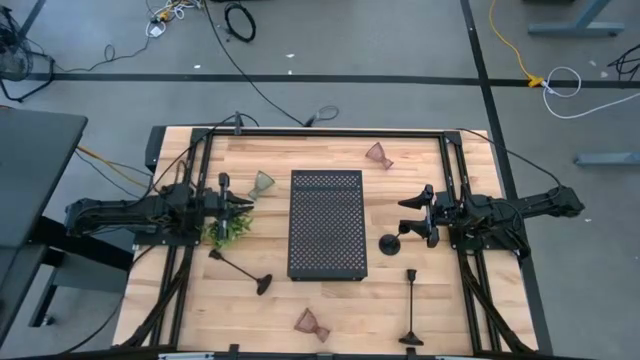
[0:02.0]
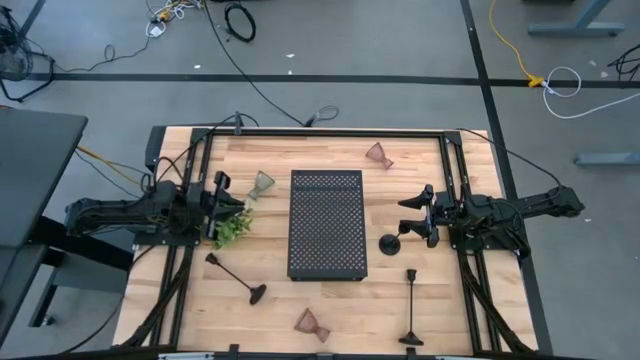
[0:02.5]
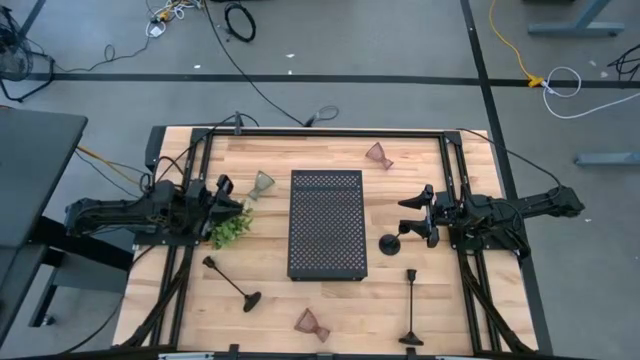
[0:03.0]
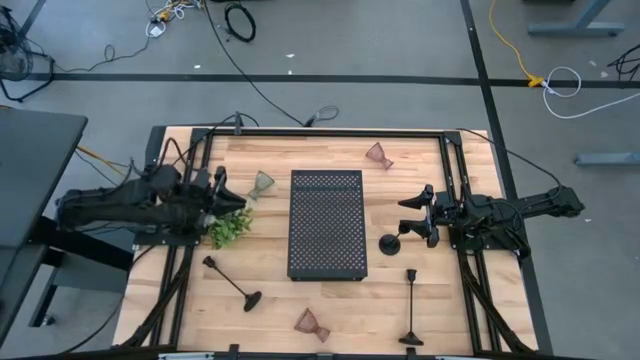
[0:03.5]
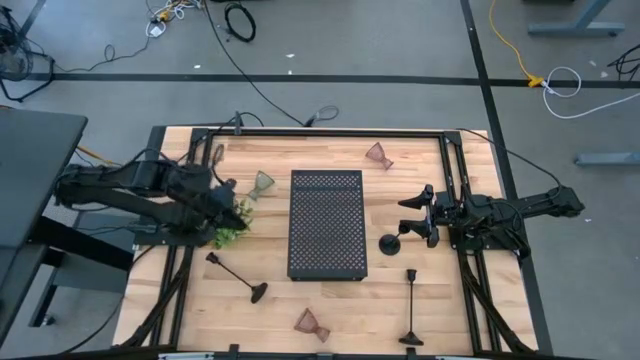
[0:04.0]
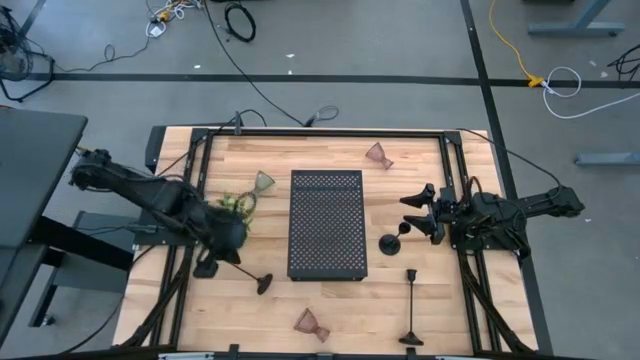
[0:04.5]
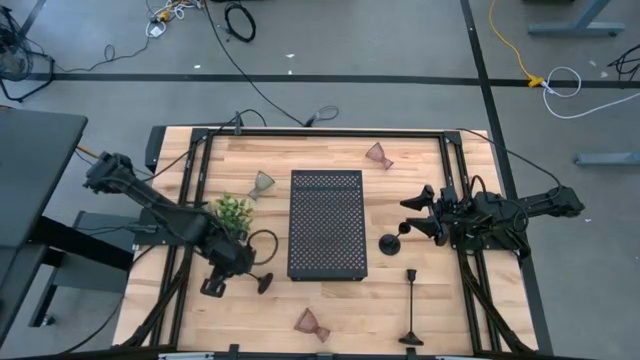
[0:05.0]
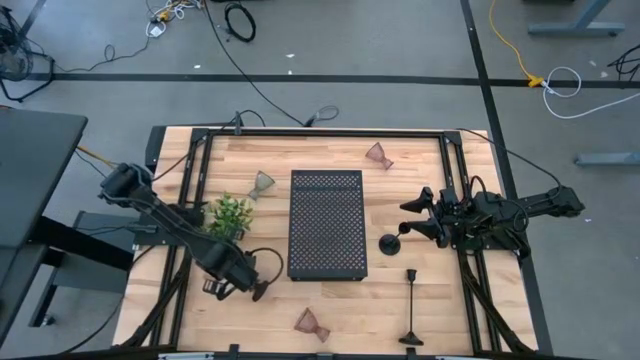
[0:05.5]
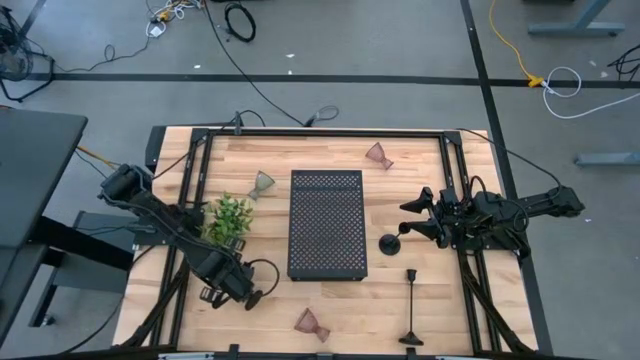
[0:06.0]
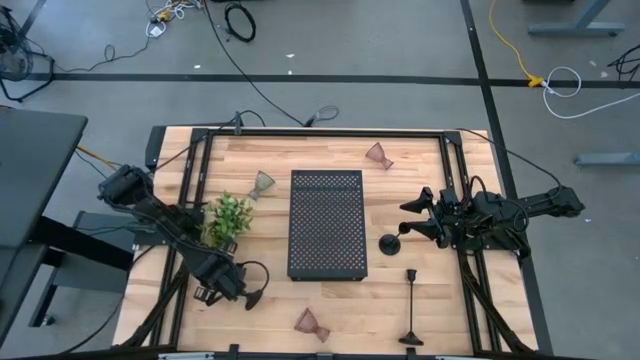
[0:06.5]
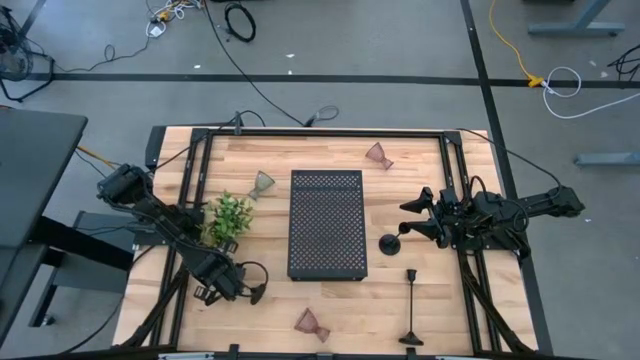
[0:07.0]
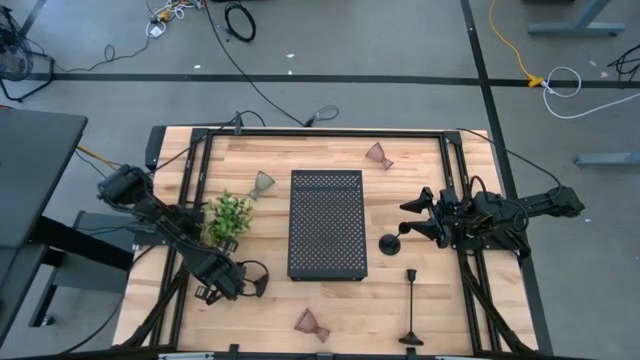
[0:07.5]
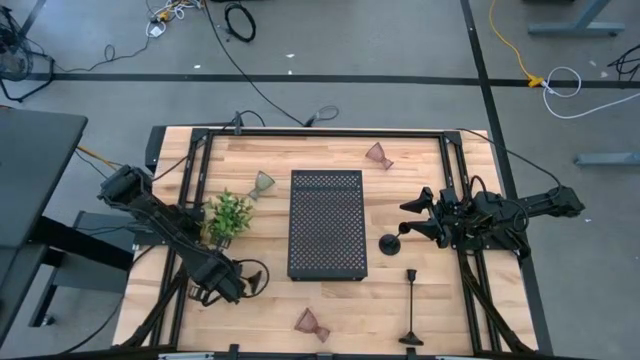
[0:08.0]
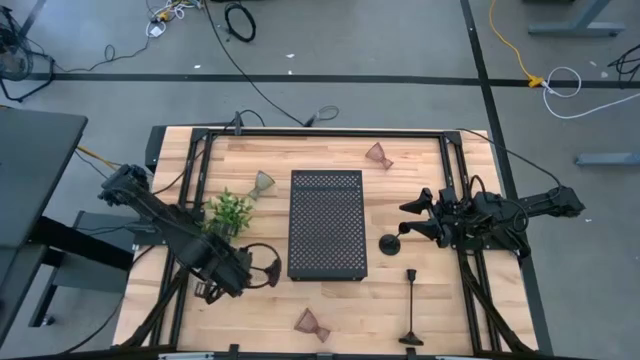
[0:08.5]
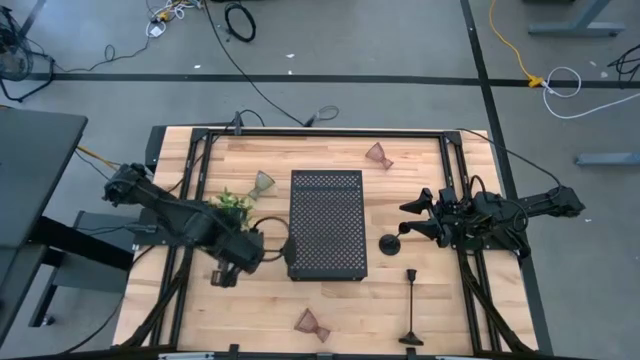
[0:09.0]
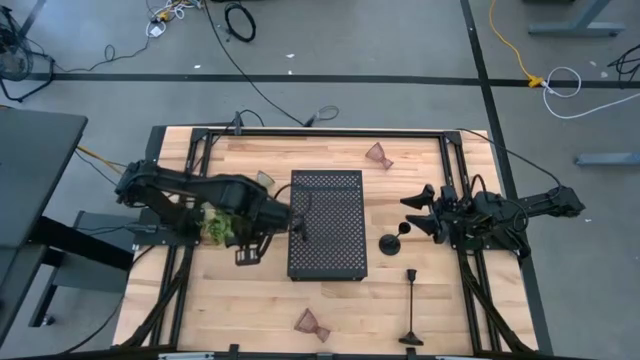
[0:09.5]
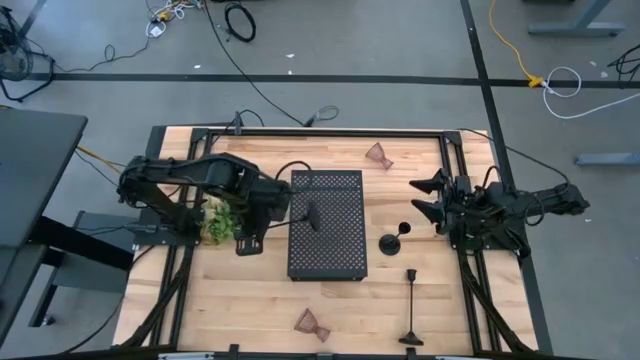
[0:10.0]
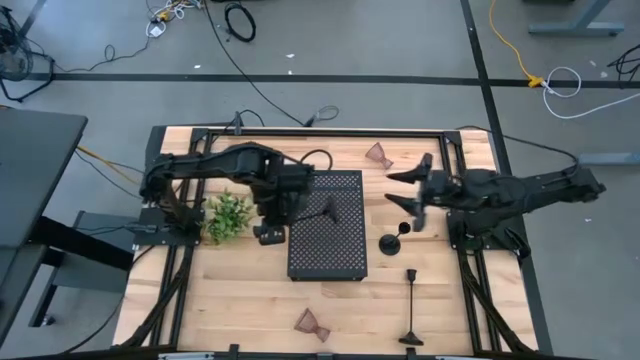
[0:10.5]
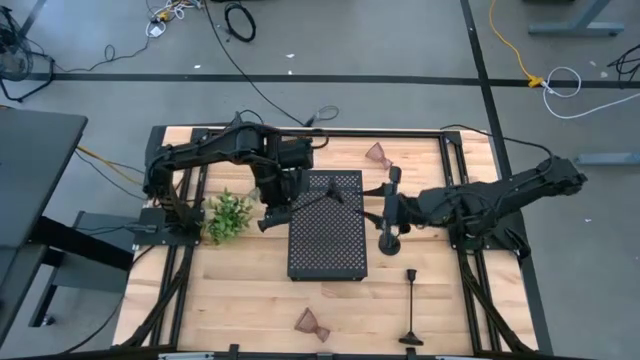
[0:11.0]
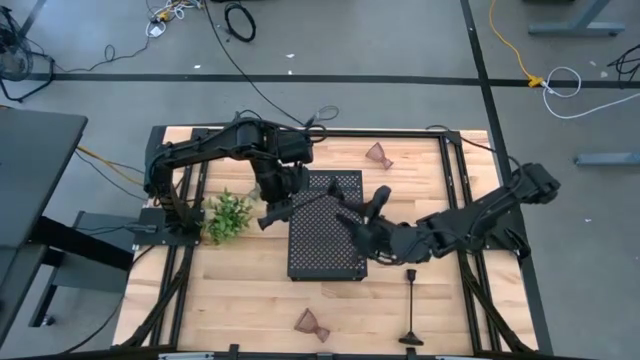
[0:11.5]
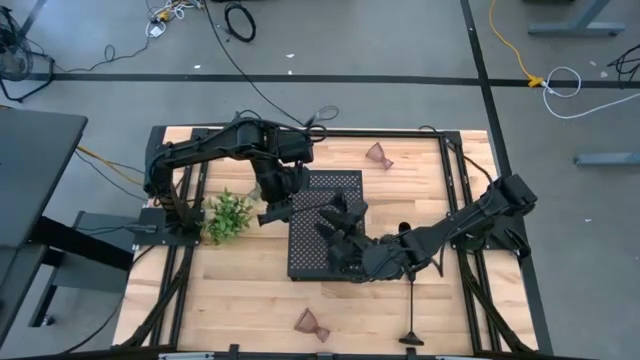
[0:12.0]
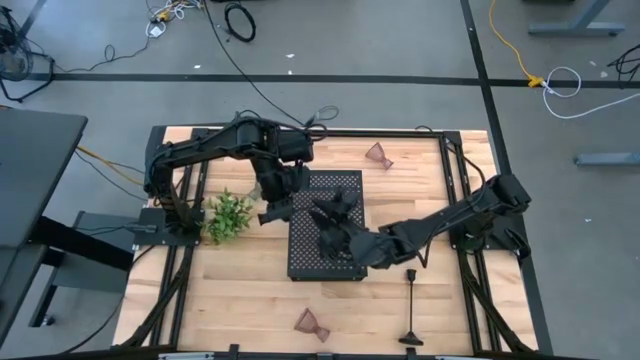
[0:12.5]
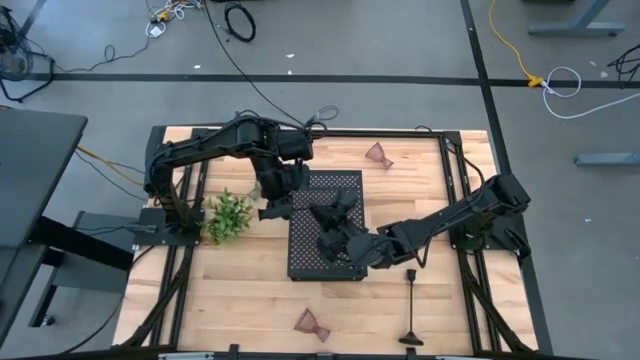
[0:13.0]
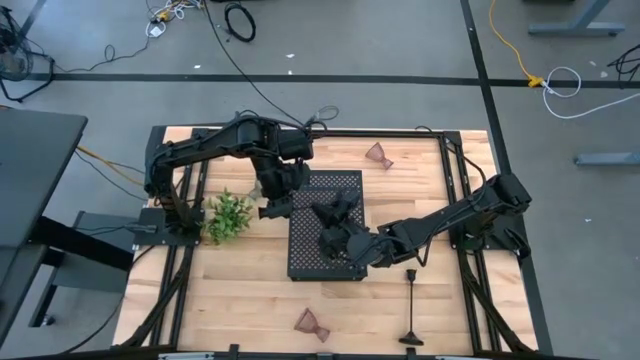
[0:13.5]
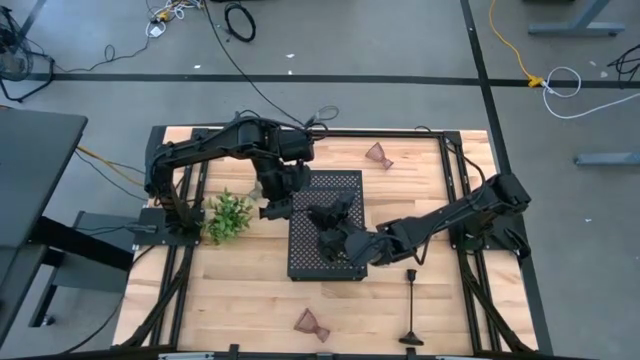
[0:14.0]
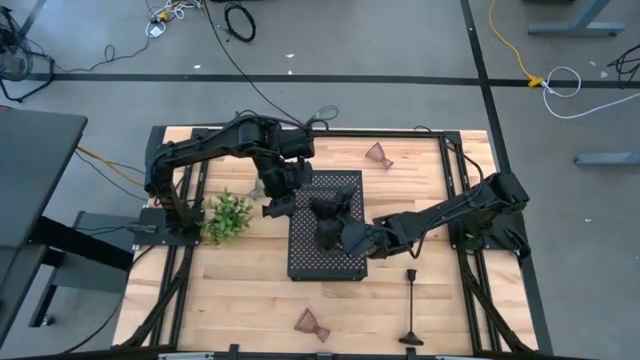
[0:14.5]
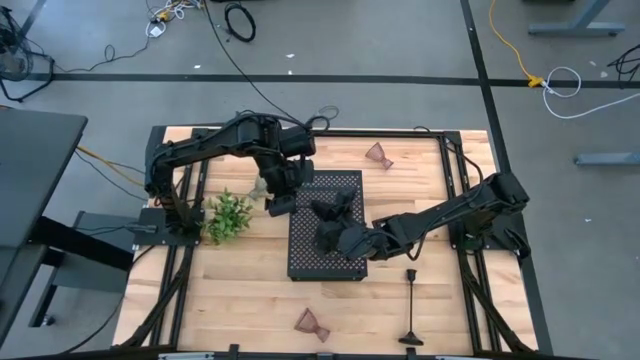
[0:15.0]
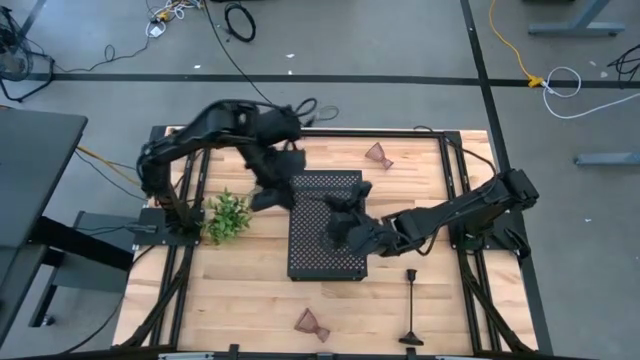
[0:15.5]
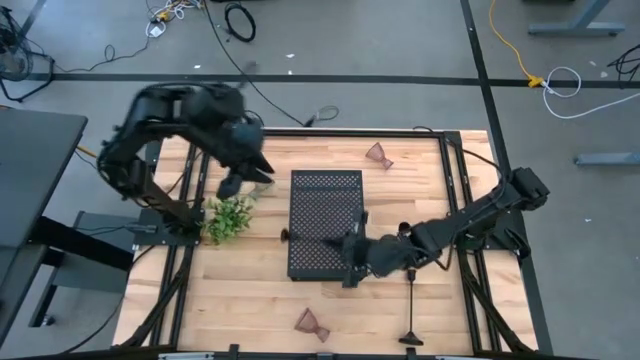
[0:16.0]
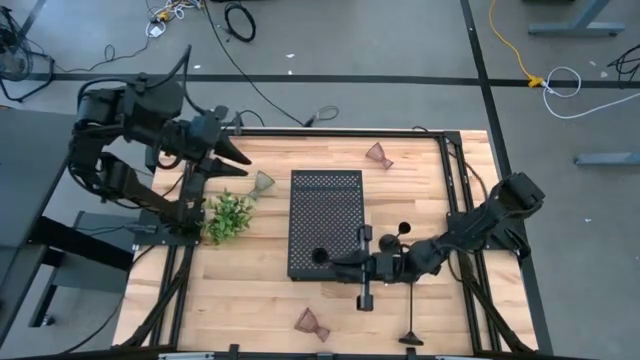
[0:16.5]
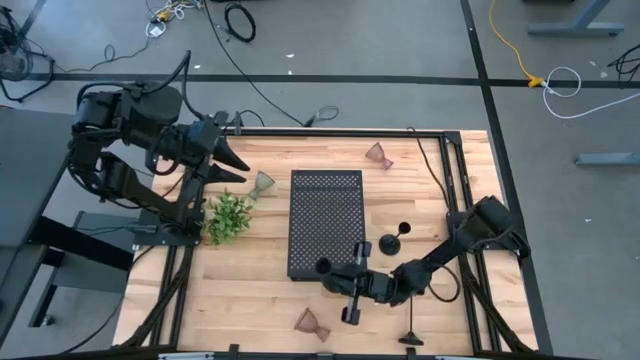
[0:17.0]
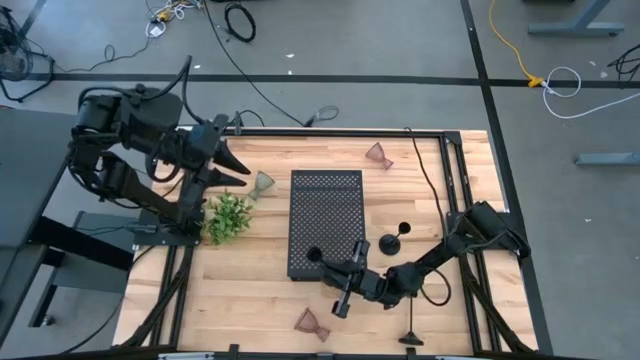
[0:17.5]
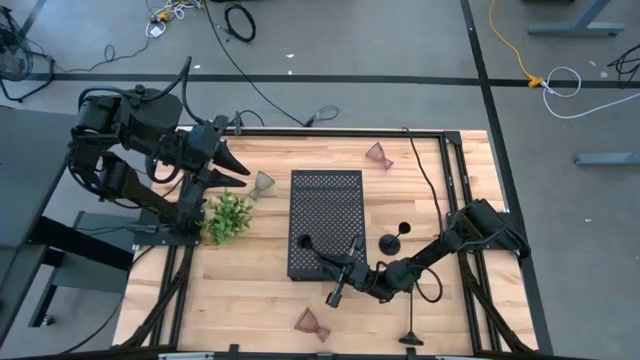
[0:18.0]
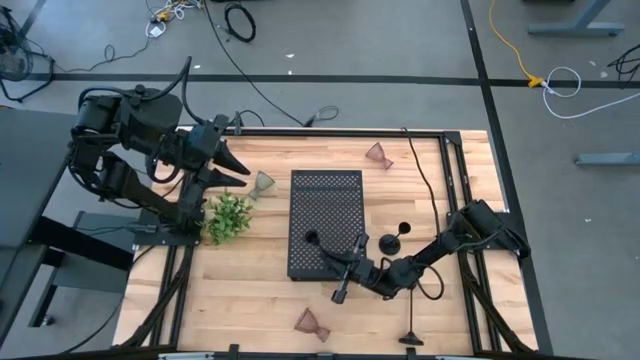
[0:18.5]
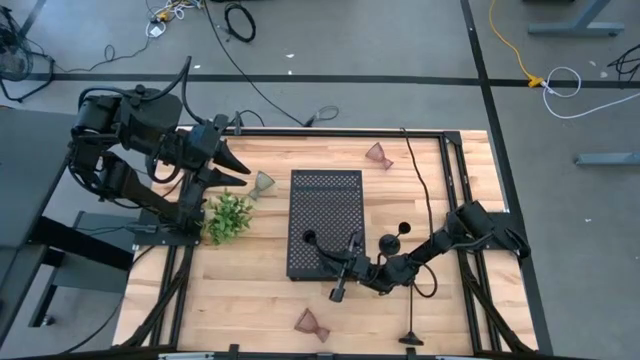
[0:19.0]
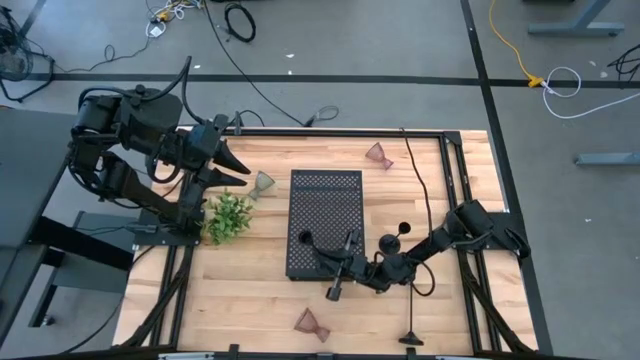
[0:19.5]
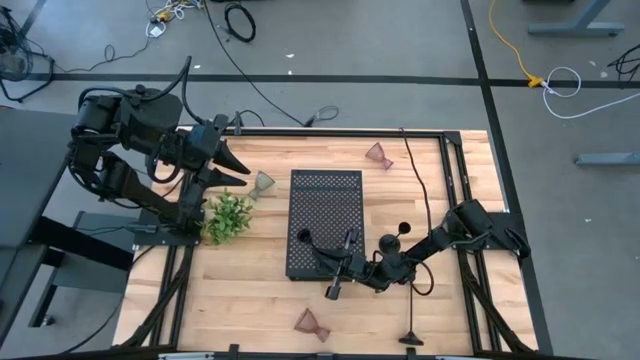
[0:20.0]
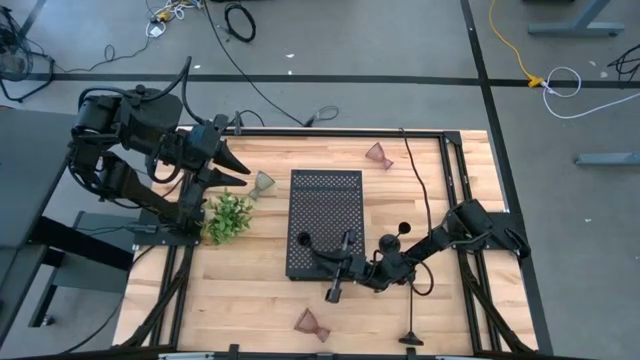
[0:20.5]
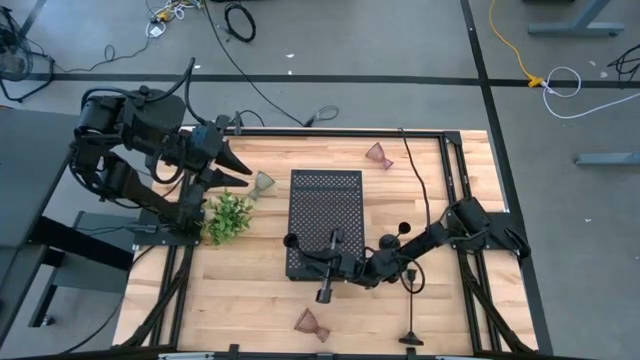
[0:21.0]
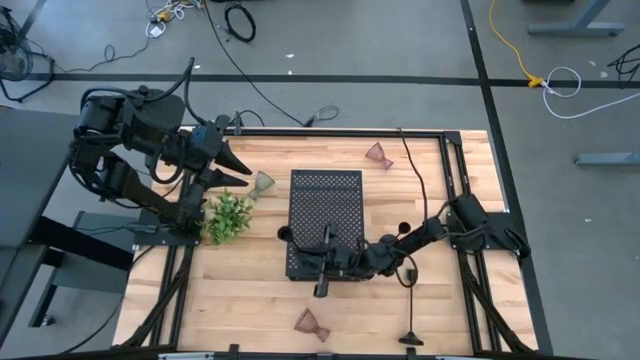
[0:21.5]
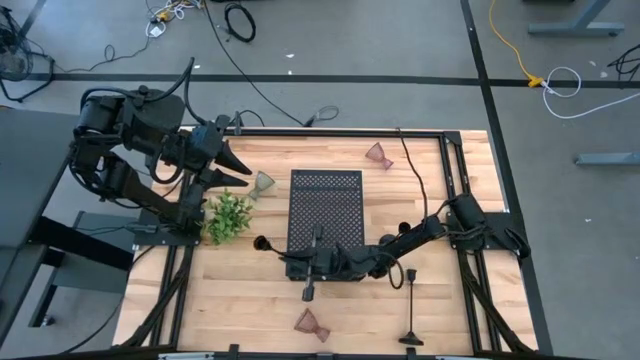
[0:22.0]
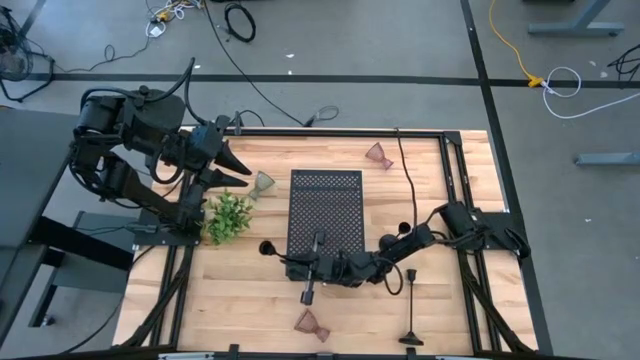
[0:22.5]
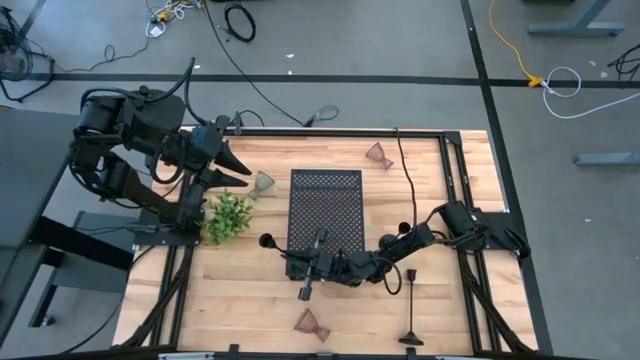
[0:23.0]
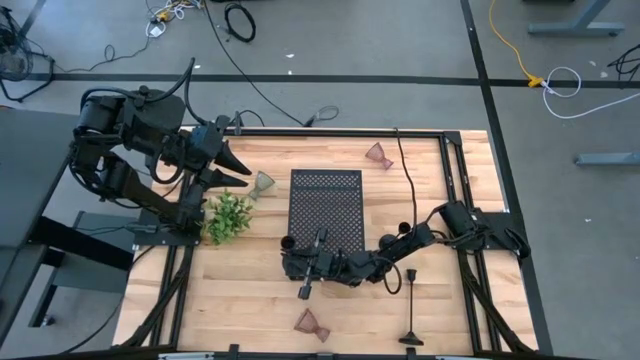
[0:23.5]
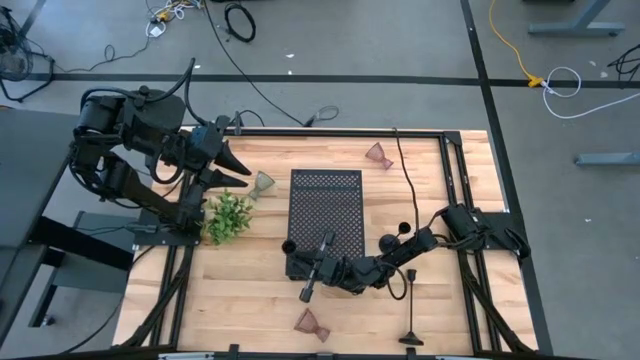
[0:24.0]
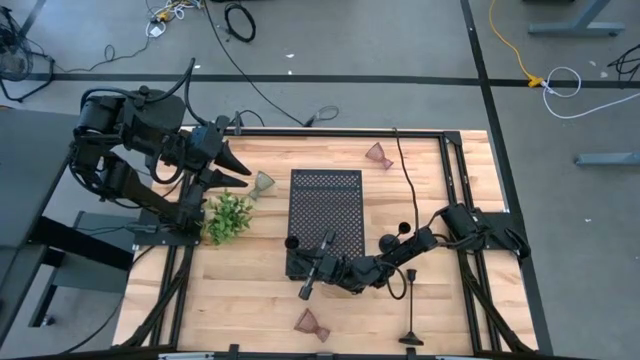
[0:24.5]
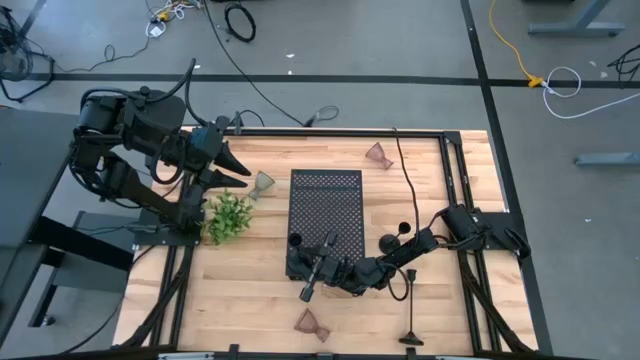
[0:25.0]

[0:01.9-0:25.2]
Task: Pick & Place candle stick holders
Put the left black candle holder on the shelf
